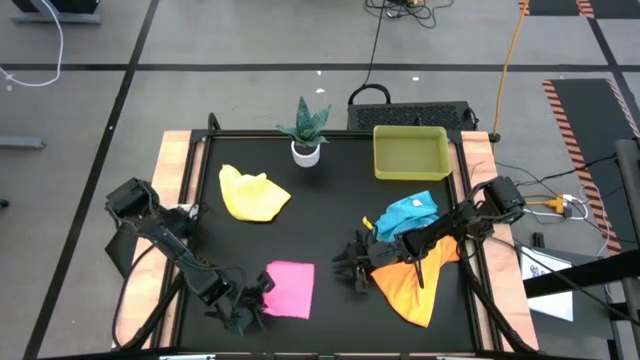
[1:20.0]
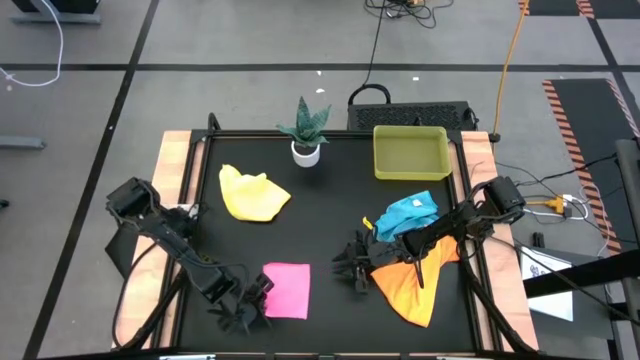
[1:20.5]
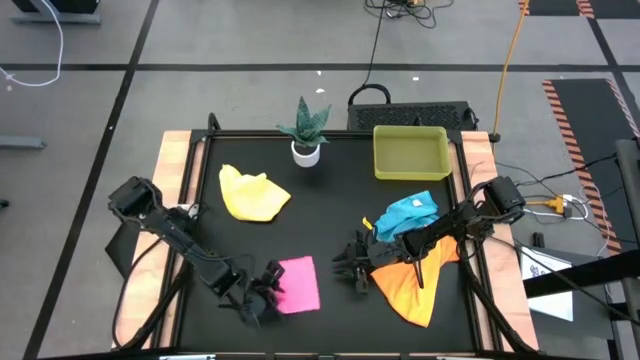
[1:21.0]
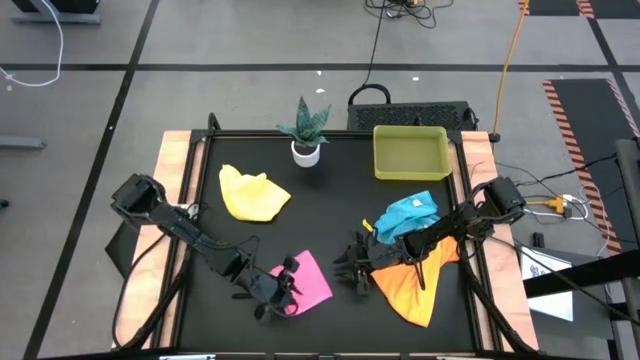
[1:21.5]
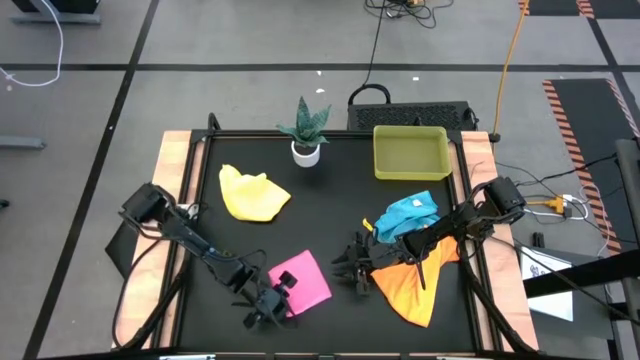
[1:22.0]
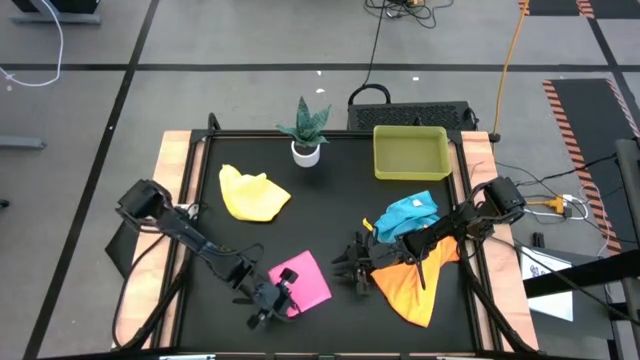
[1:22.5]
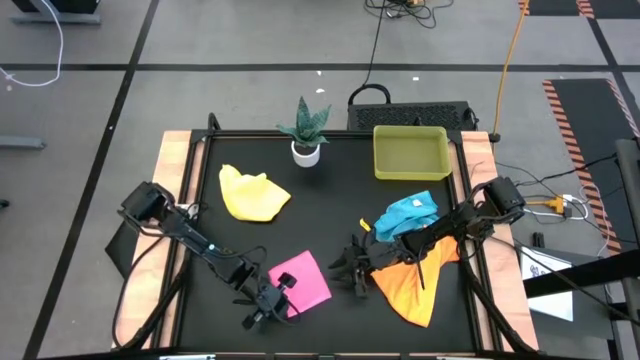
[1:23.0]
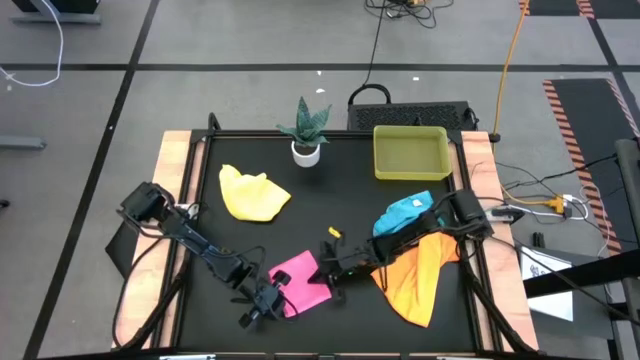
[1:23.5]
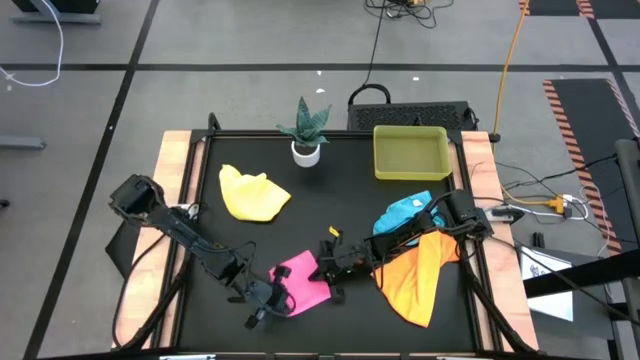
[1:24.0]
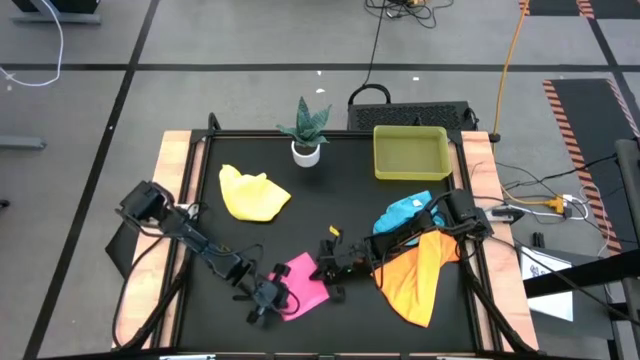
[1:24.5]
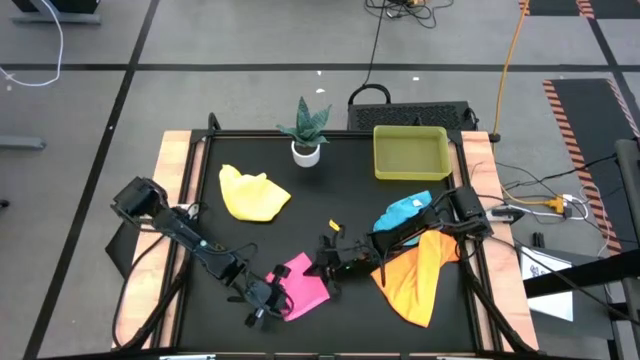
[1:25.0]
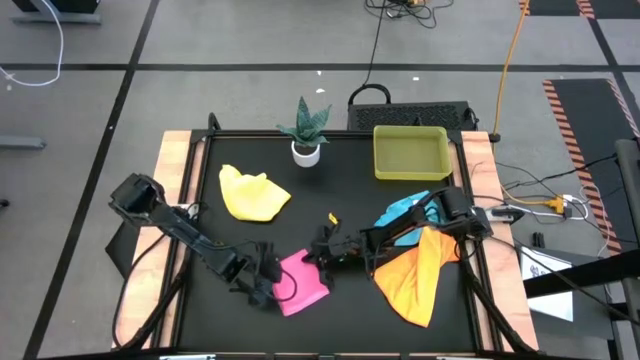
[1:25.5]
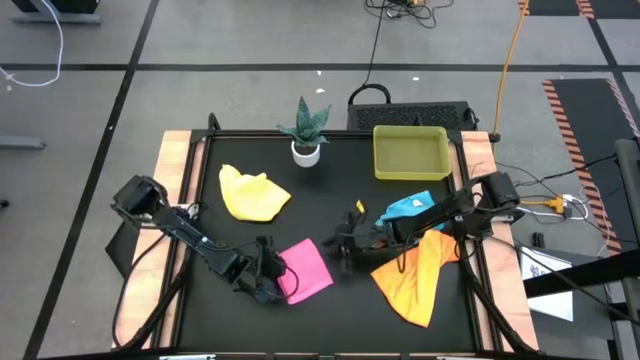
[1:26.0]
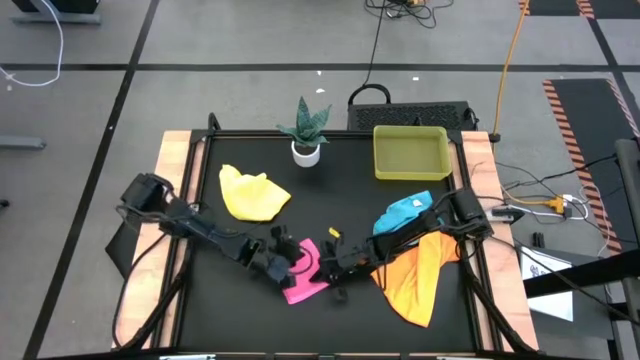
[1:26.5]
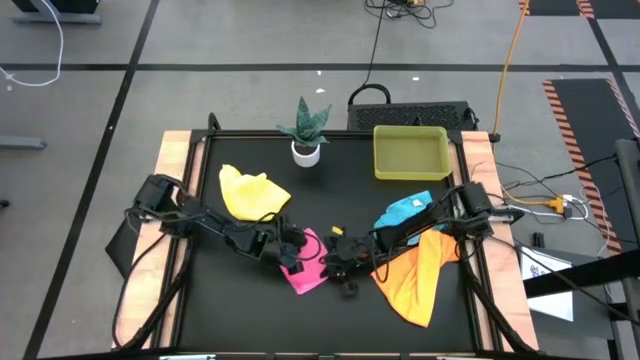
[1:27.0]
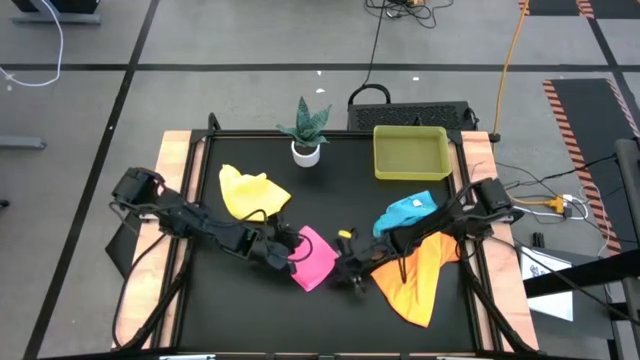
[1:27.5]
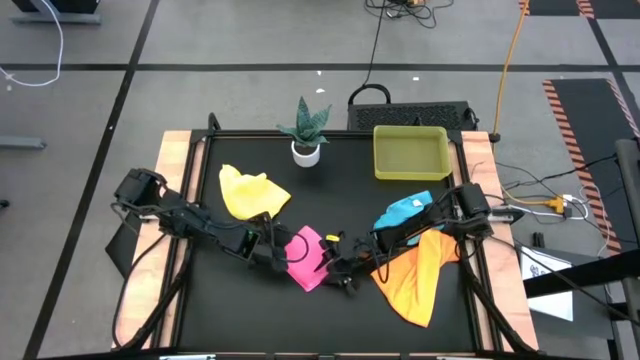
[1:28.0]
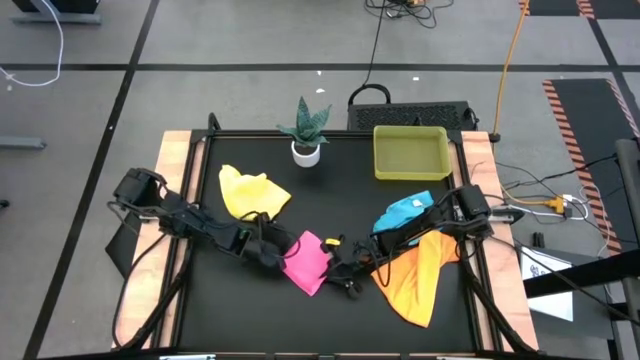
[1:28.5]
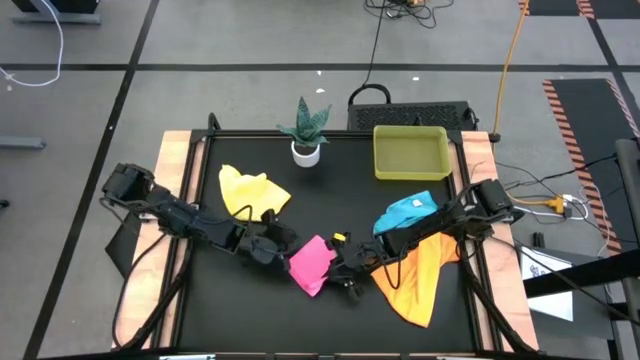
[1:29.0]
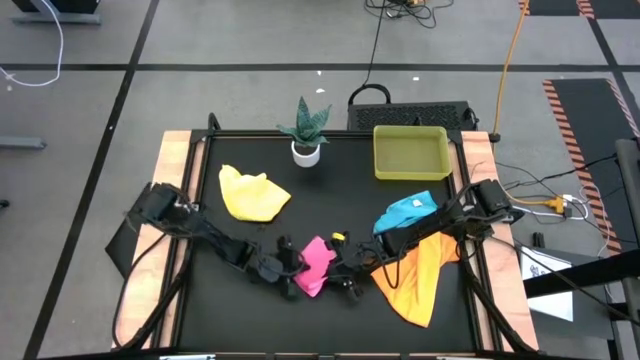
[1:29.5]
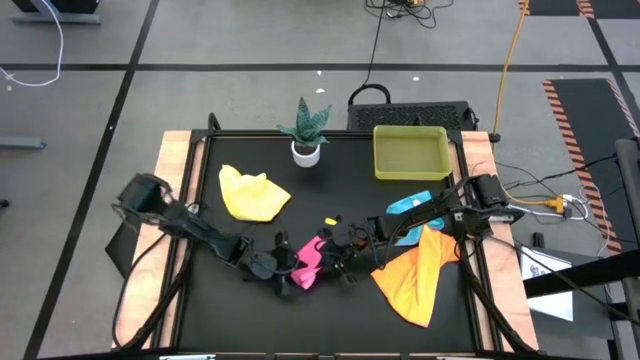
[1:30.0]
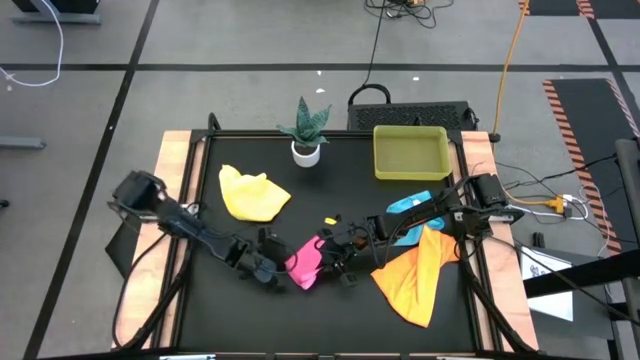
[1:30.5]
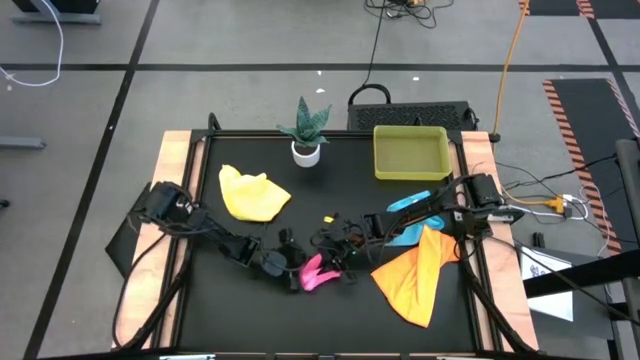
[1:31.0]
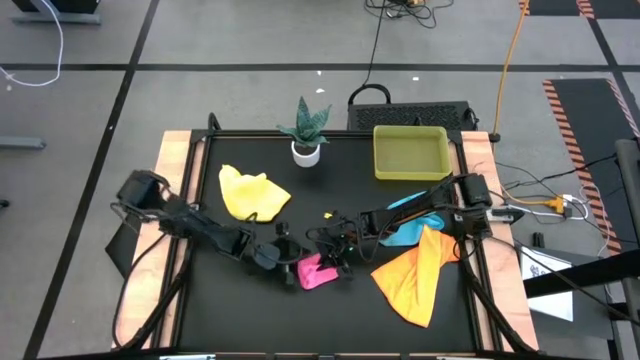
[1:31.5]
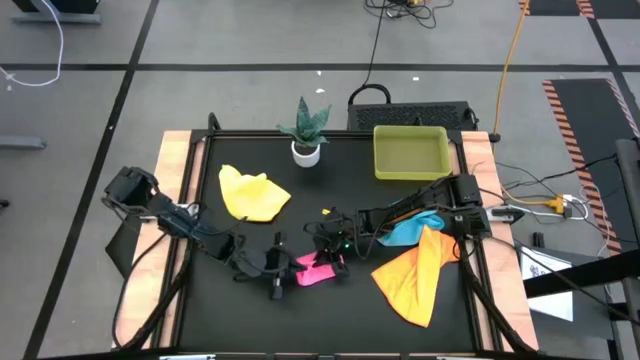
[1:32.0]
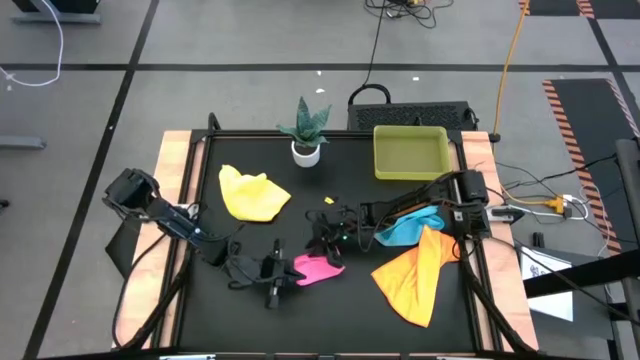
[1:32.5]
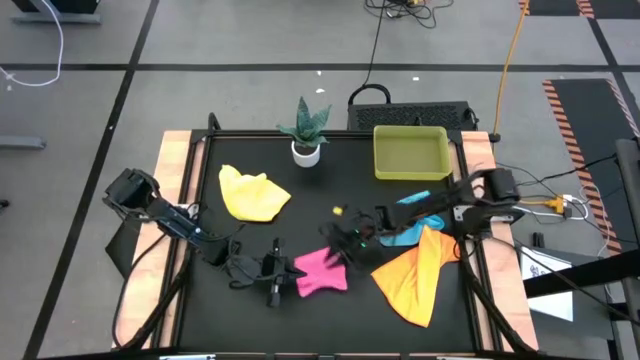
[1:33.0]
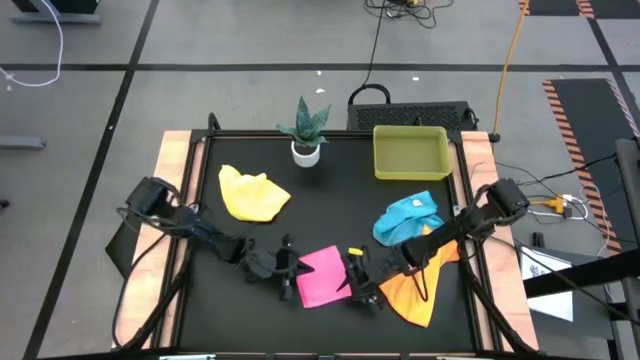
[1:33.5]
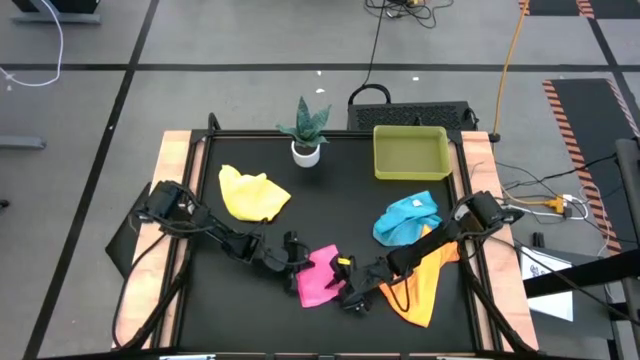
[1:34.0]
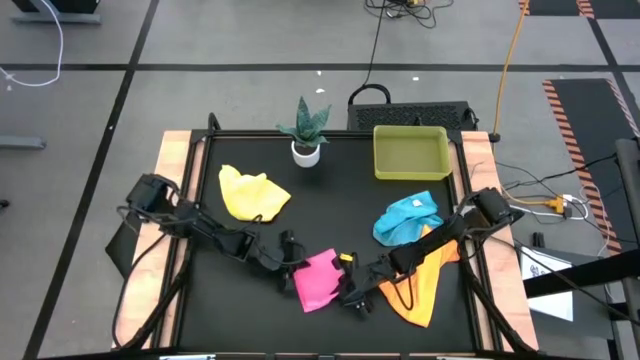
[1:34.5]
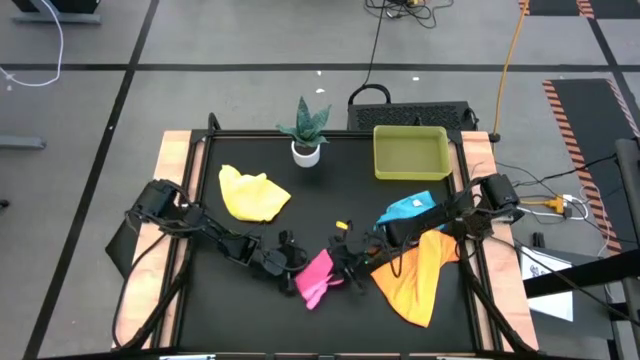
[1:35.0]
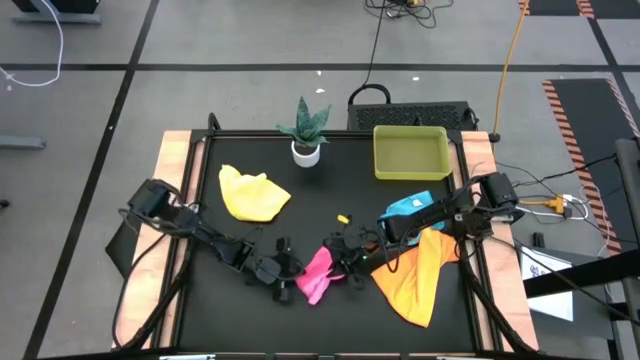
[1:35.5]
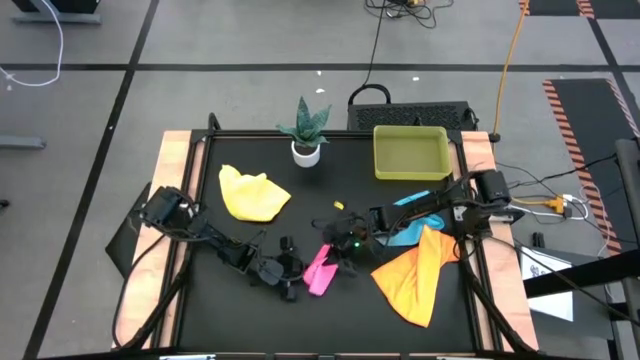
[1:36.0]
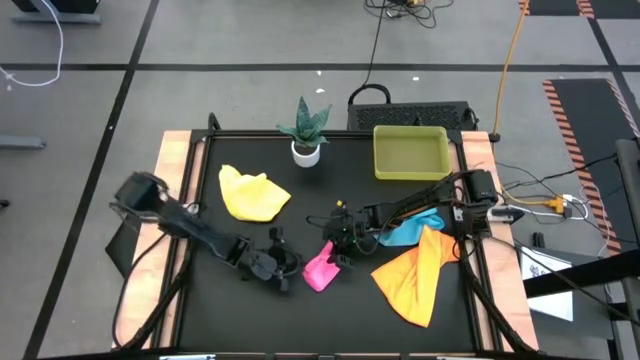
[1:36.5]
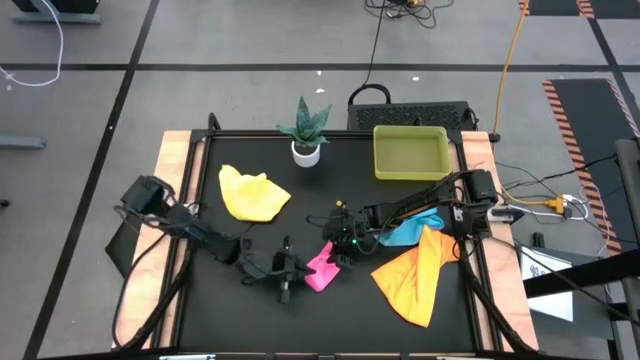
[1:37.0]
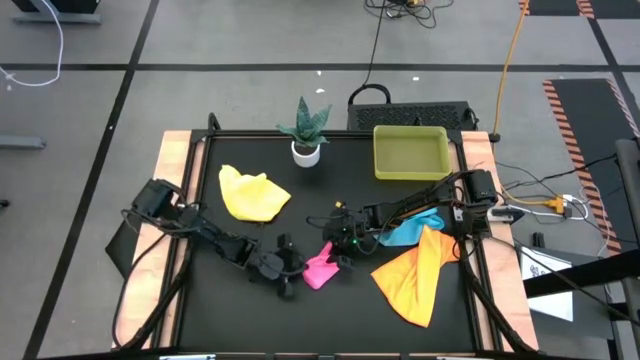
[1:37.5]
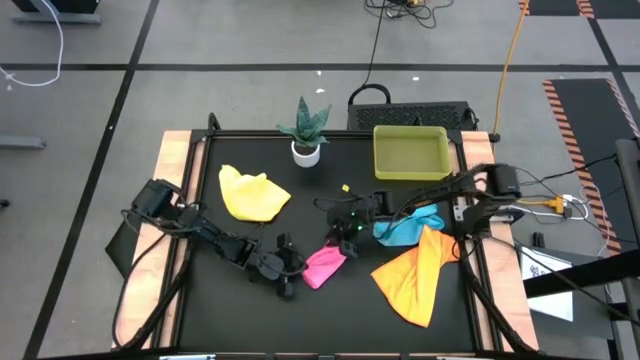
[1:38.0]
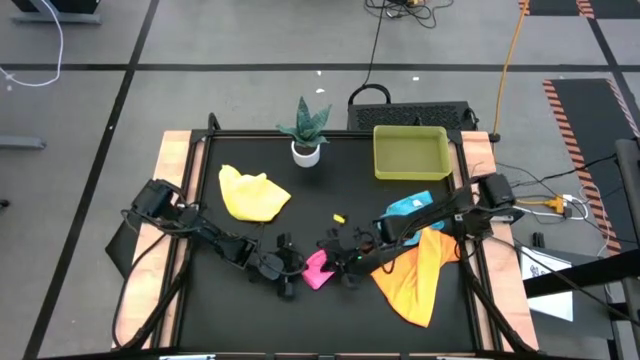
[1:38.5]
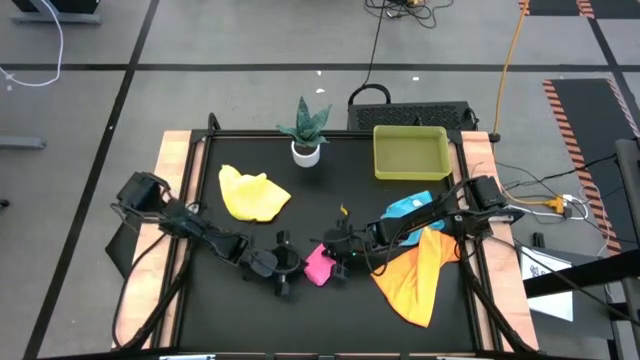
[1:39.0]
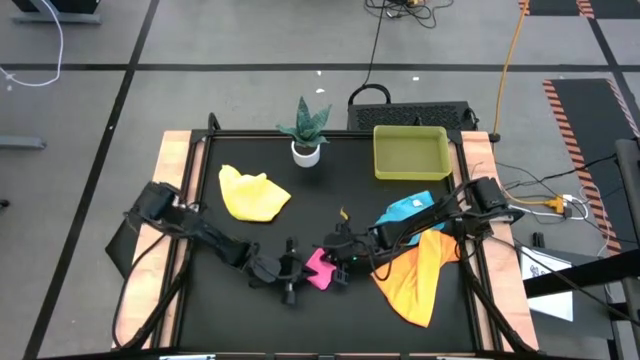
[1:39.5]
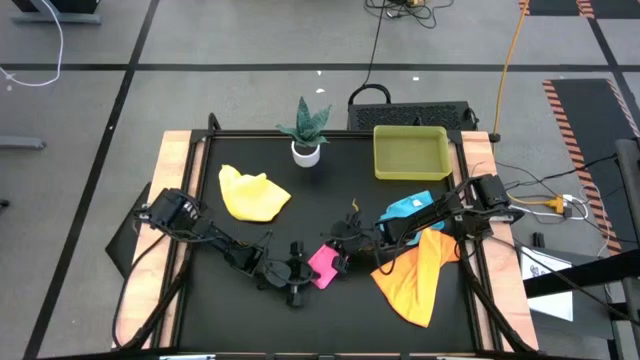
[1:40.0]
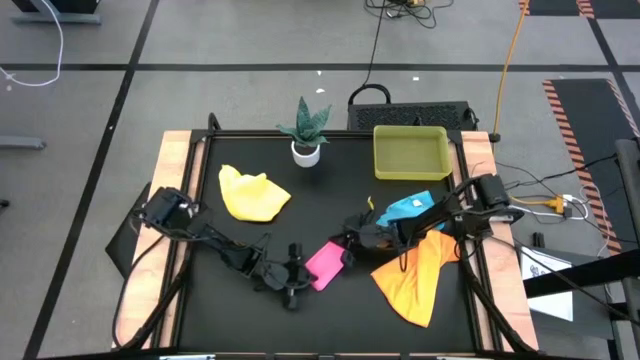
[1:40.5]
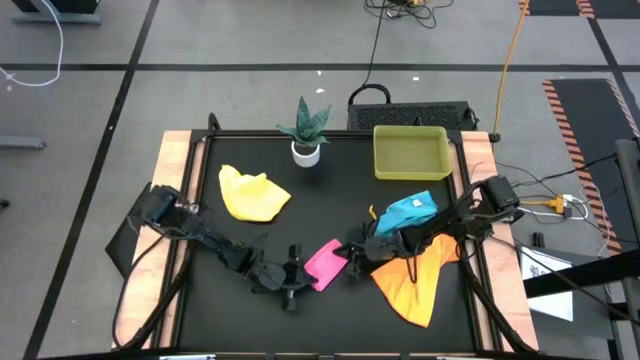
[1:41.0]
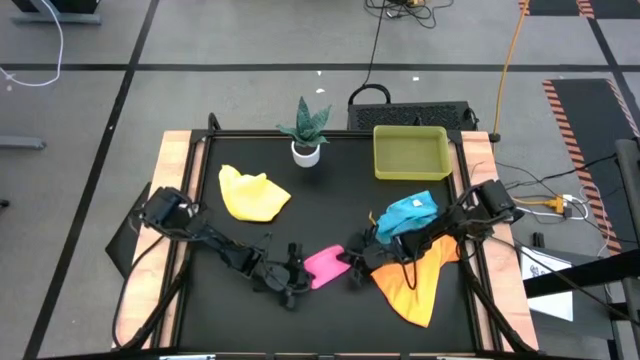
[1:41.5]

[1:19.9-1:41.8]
Task: Fold microfiber towels
Fold the pink microfiber cloth
